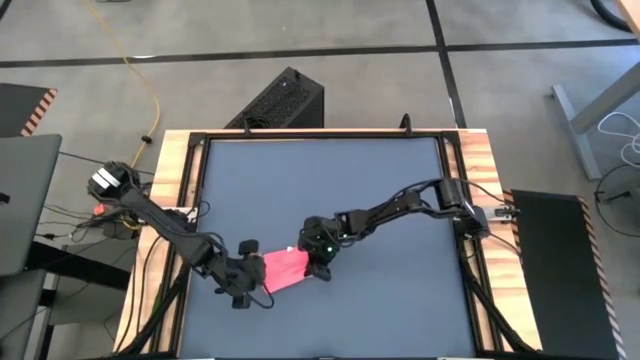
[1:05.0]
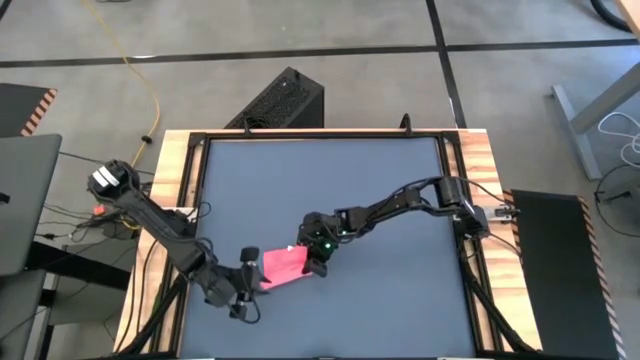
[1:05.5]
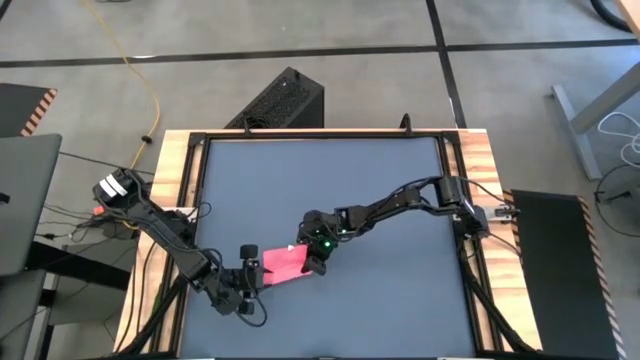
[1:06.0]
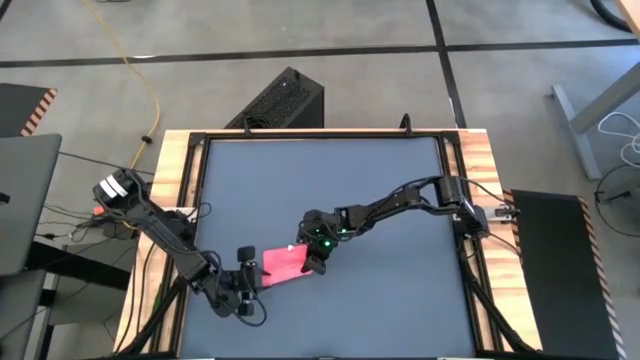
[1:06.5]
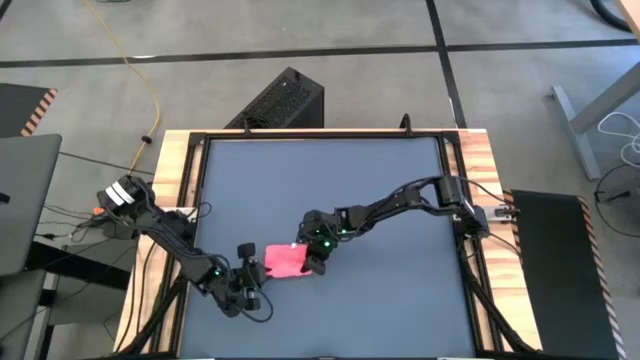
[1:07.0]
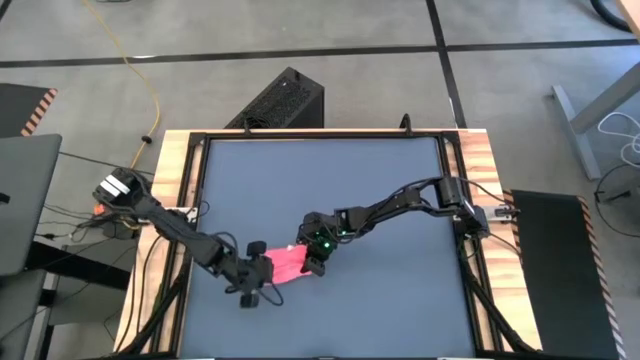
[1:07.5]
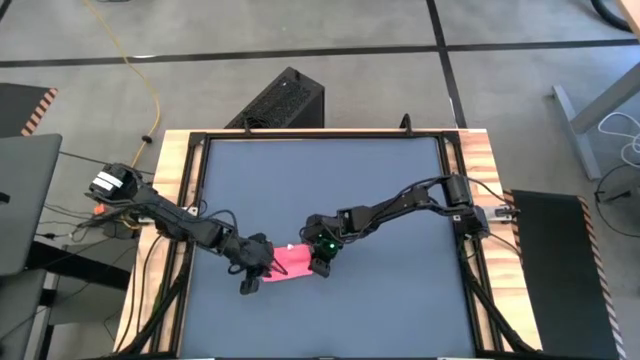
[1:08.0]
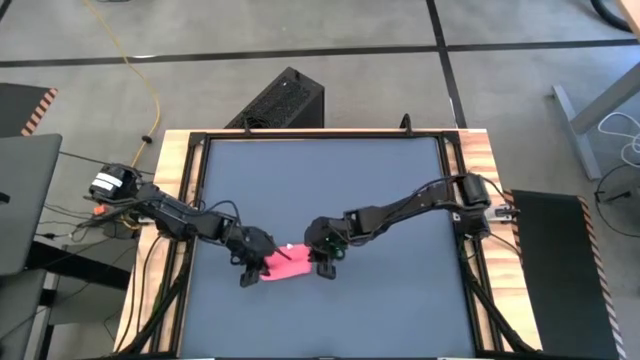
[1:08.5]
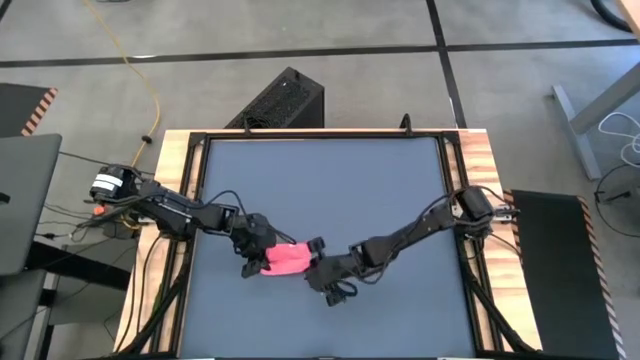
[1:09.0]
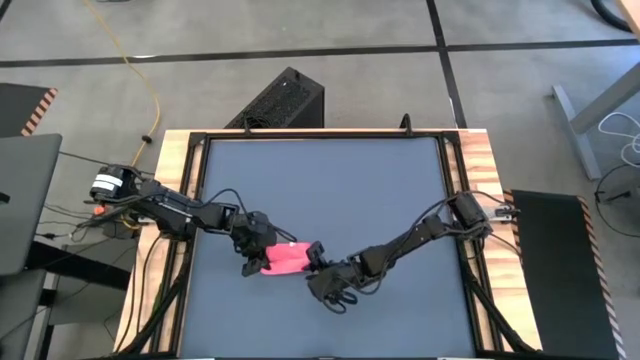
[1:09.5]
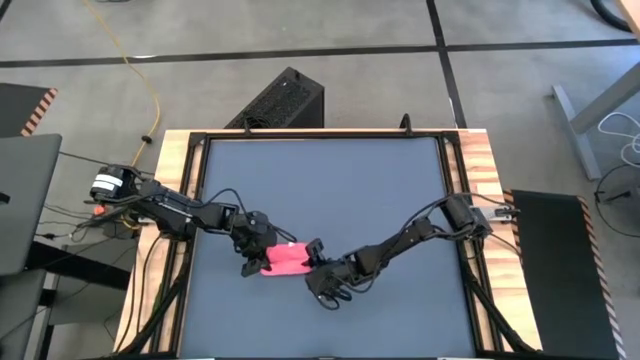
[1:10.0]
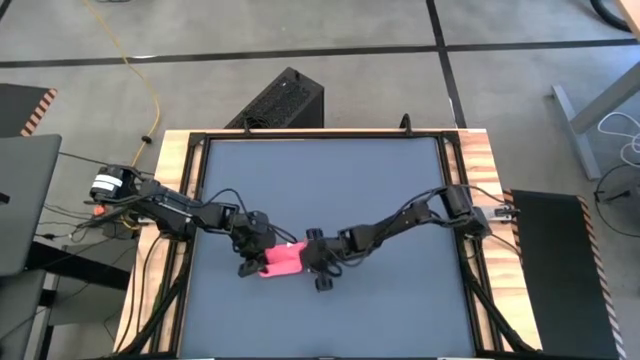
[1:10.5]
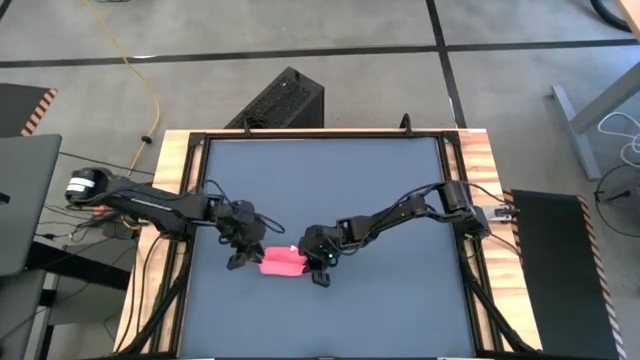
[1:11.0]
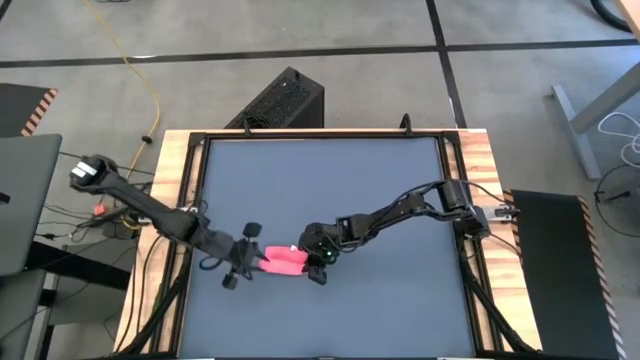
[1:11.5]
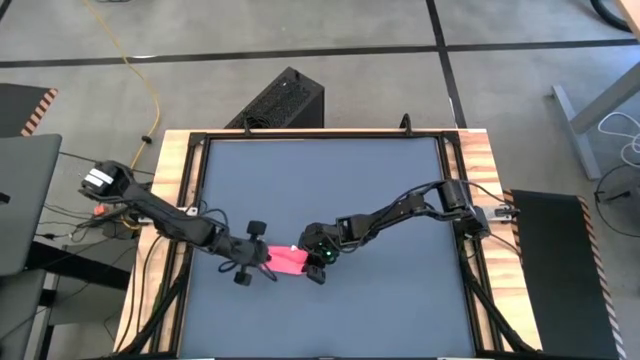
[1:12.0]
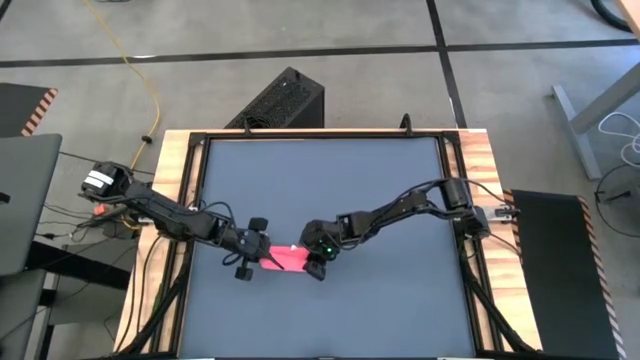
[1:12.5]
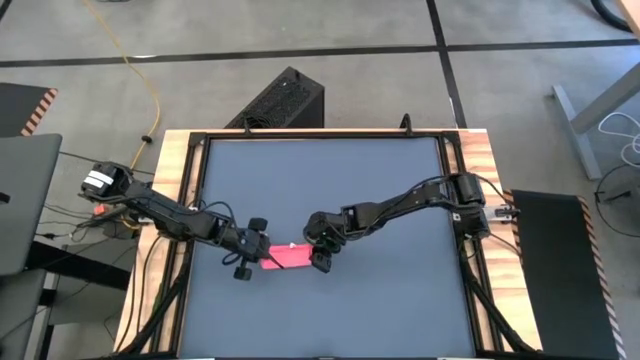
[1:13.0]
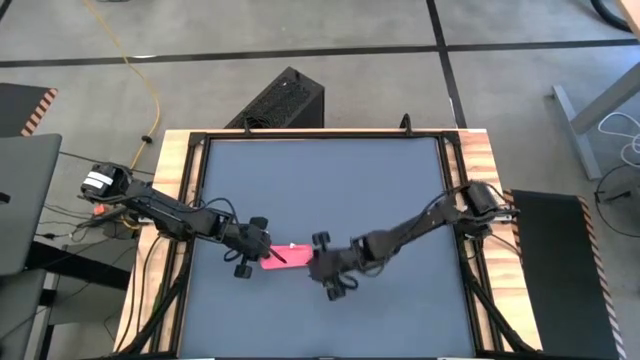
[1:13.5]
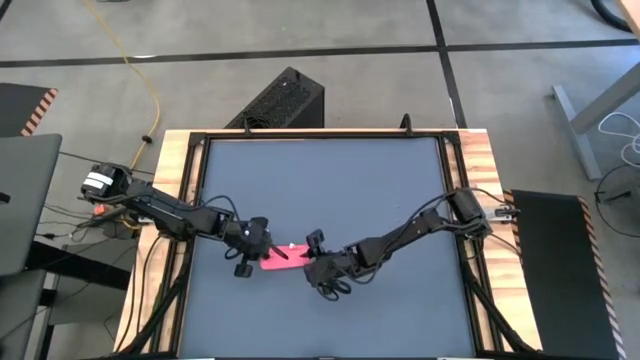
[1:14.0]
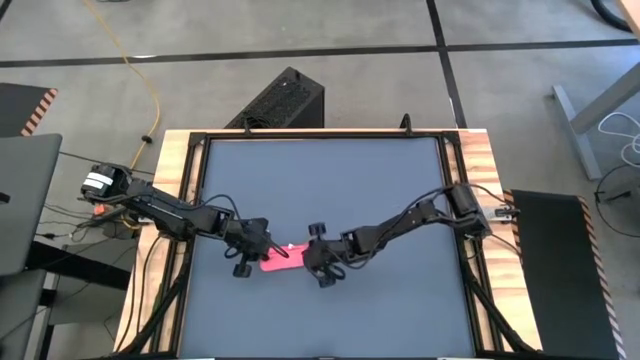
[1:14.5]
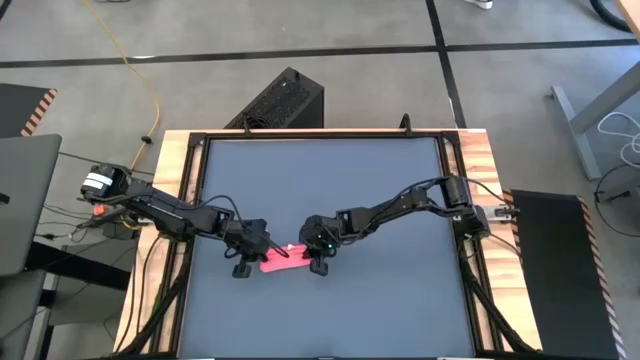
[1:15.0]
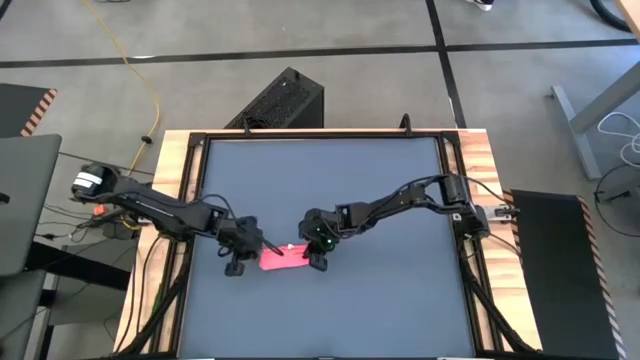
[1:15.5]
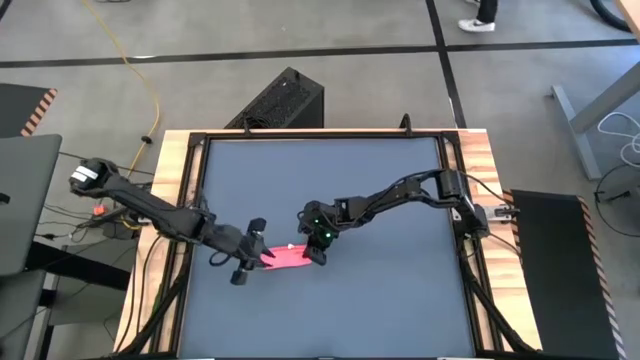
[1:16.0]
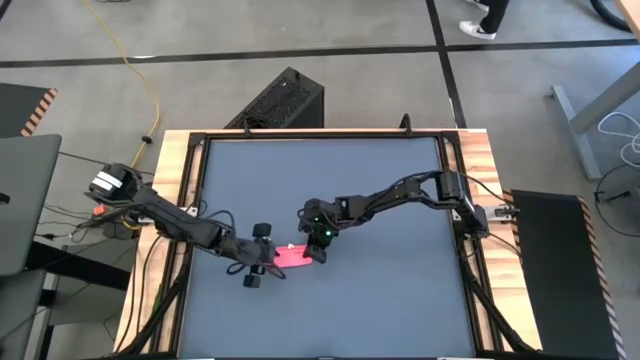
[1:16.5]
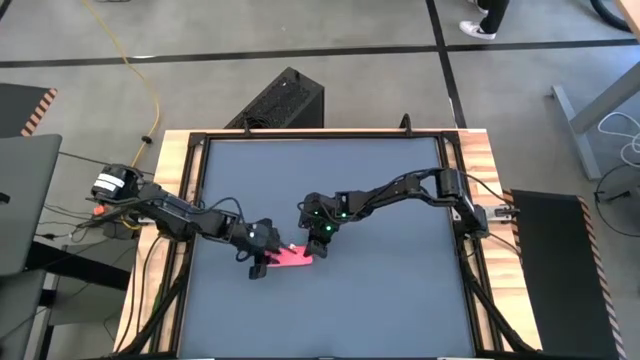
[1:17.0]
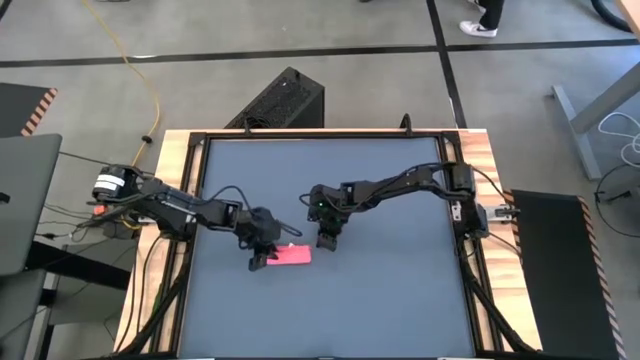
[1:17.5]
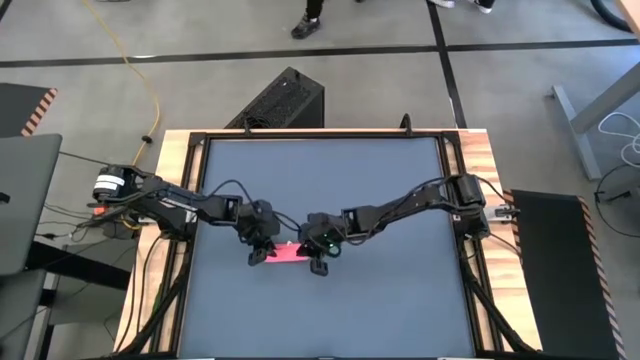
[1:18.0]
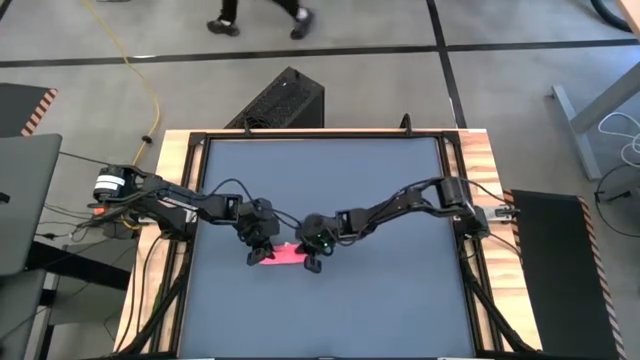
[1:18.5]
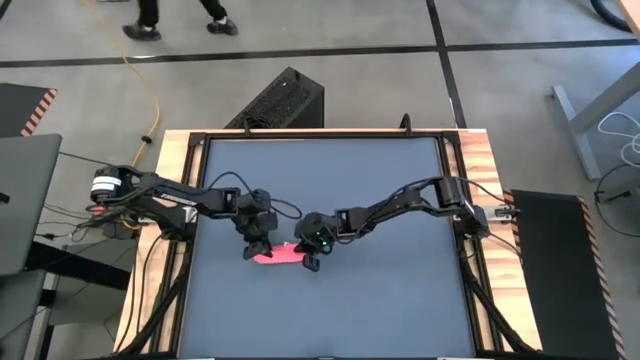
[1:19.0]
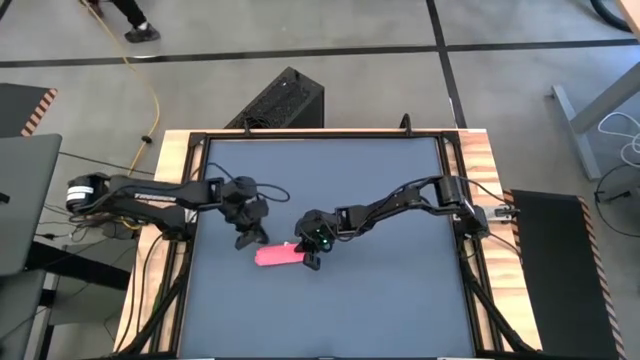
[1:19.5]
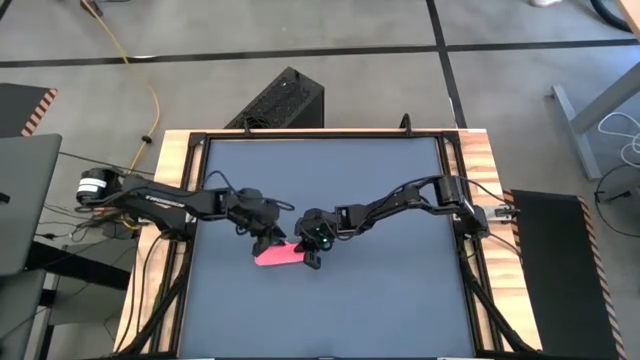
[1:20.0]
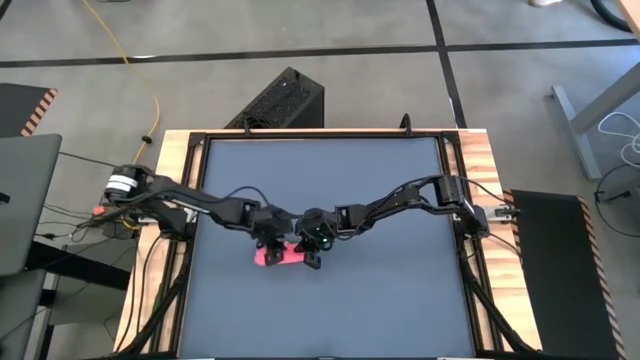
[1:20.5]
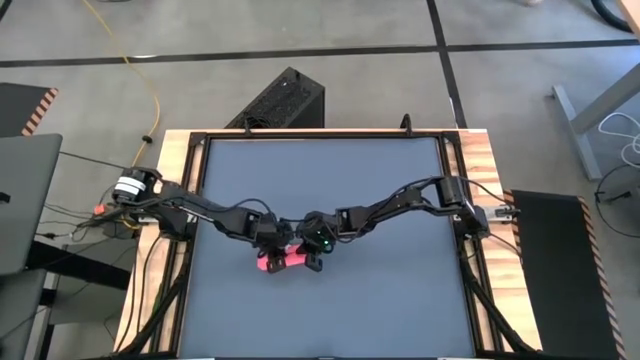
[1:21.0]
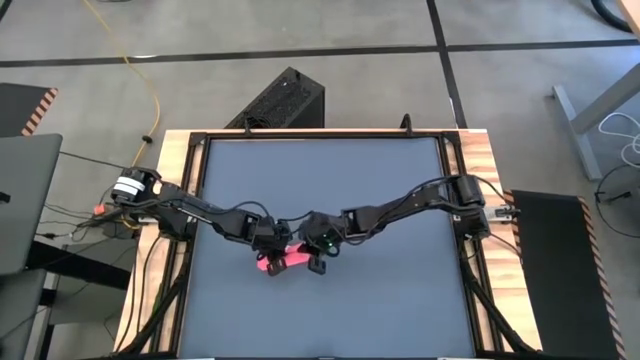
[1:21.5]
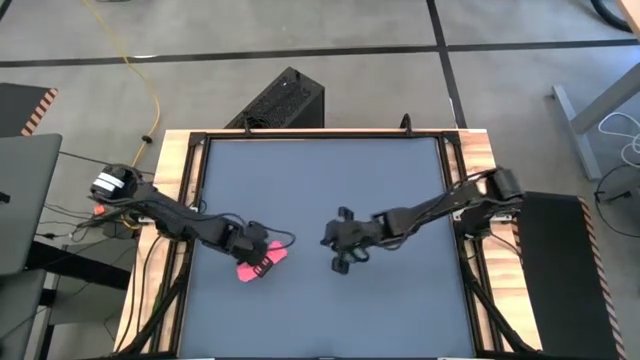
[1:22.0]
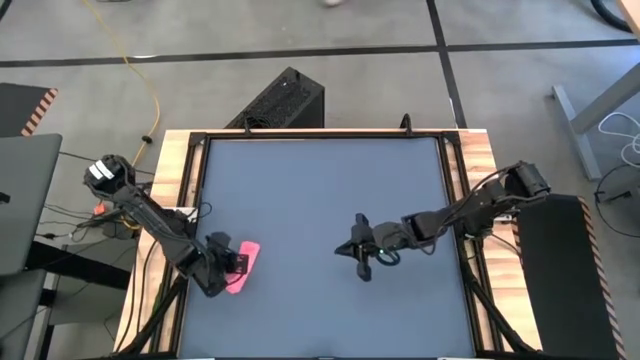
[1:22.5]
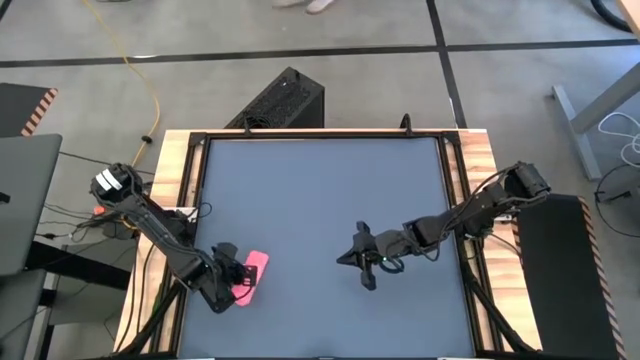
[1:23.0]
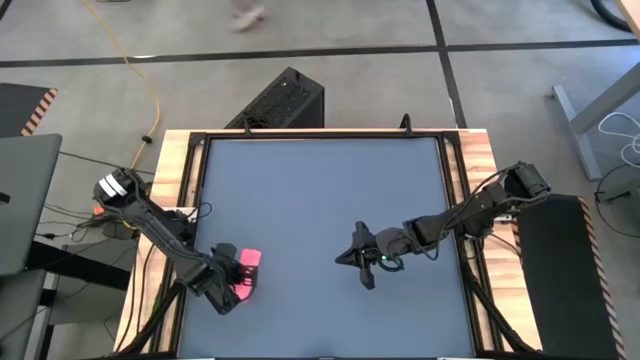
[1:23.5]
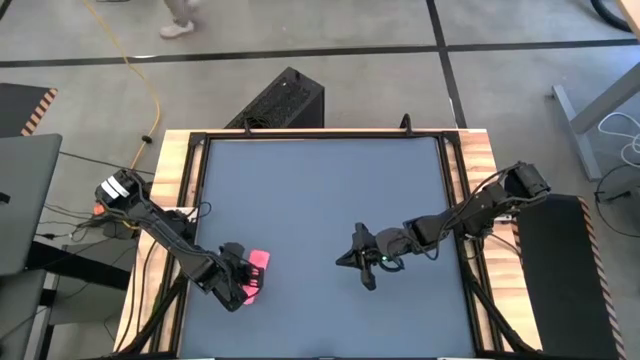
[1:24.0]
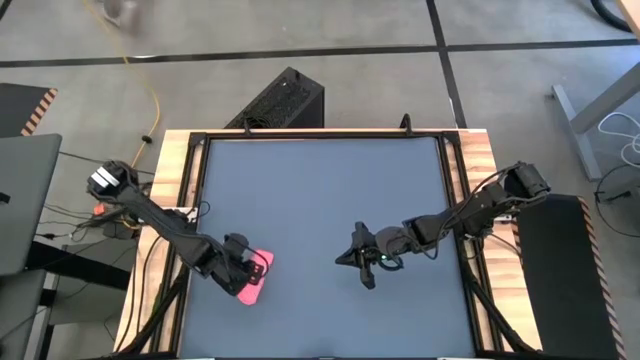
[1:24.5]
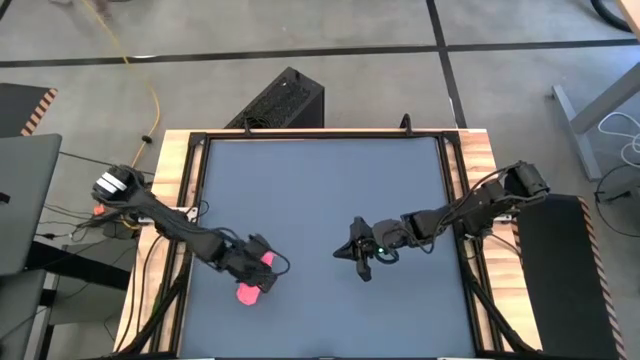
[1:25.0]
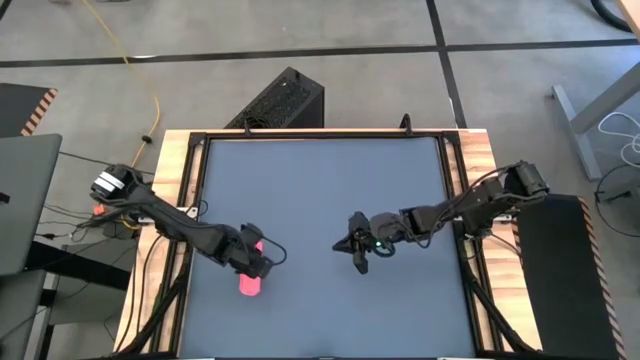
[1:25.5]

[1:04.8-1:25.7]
Task: Roll towel
Roll the red towel
